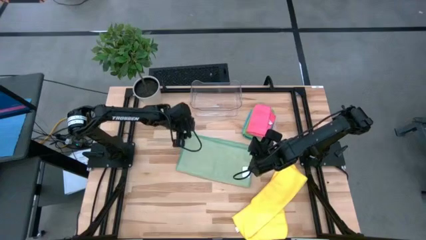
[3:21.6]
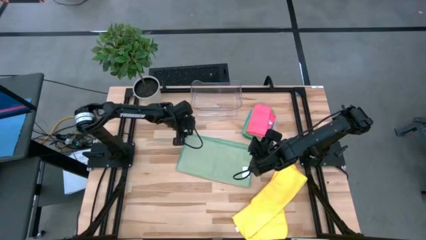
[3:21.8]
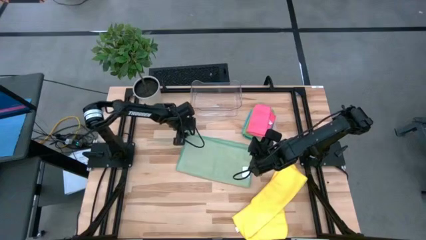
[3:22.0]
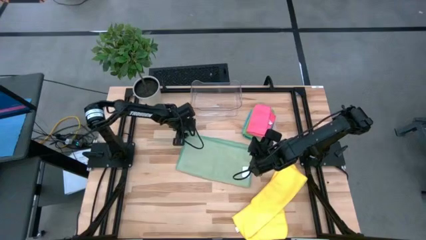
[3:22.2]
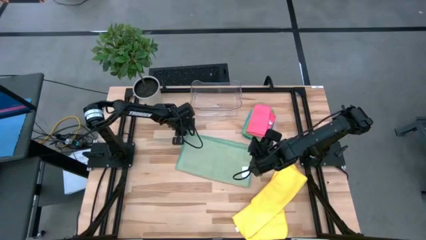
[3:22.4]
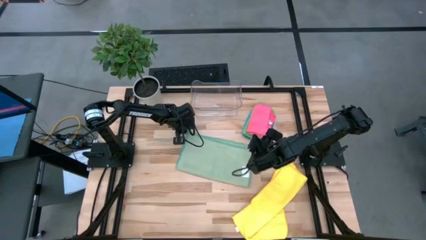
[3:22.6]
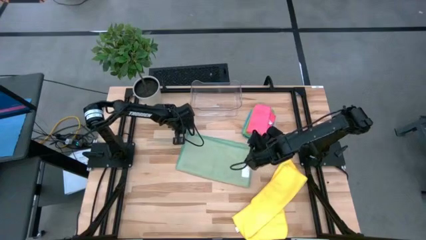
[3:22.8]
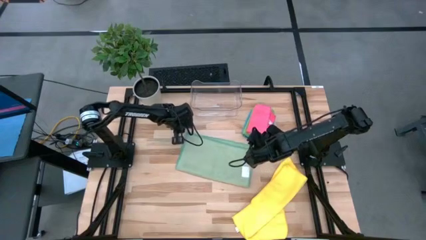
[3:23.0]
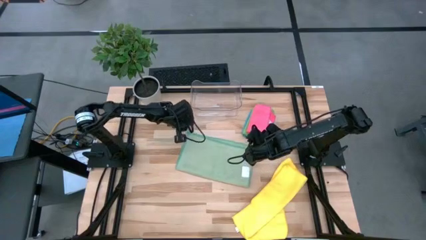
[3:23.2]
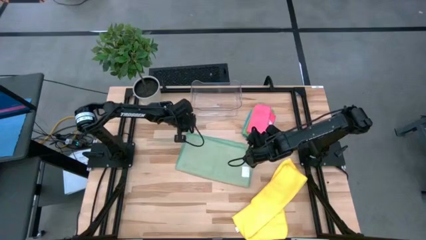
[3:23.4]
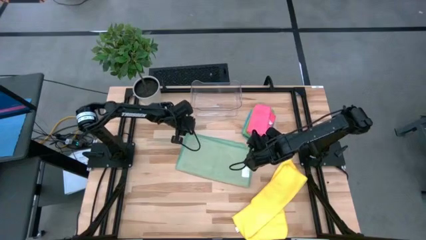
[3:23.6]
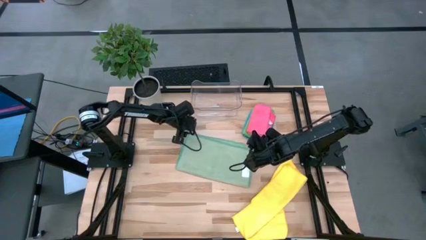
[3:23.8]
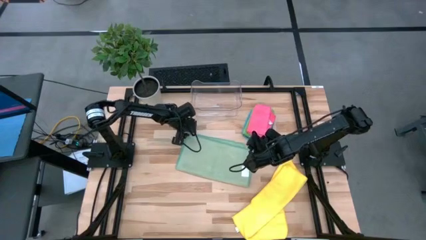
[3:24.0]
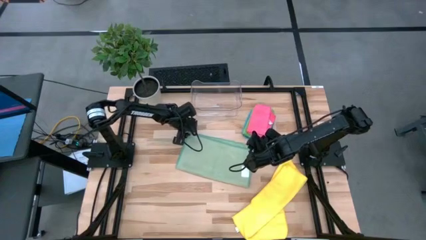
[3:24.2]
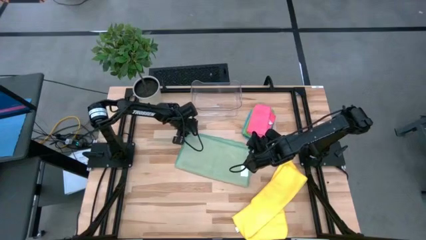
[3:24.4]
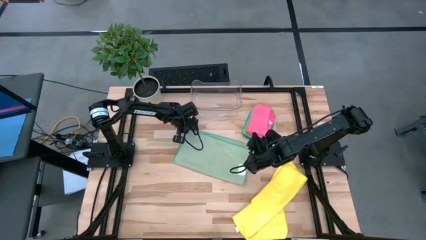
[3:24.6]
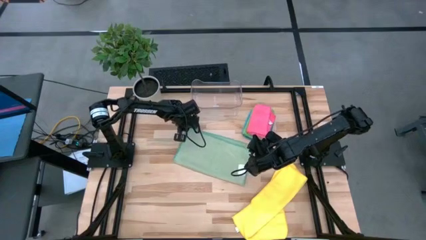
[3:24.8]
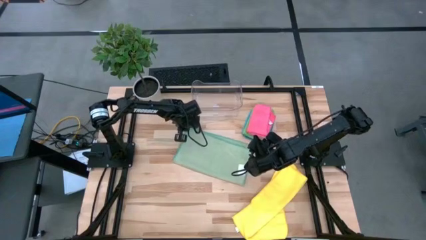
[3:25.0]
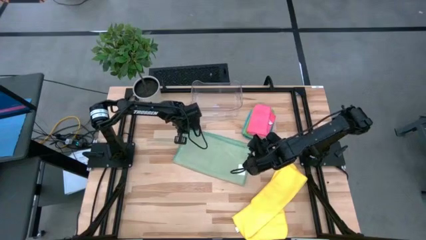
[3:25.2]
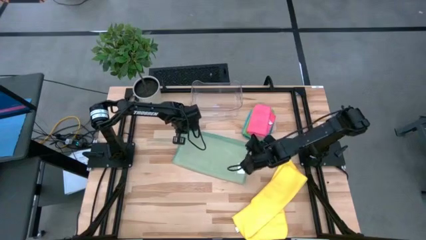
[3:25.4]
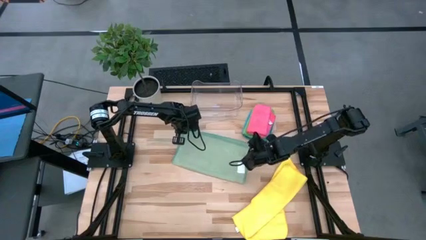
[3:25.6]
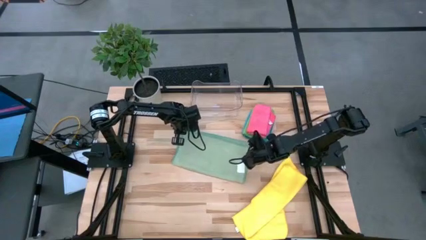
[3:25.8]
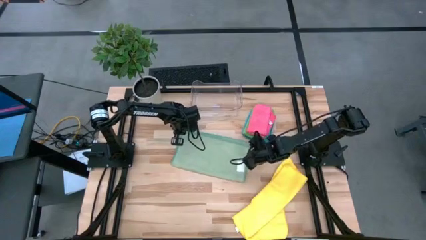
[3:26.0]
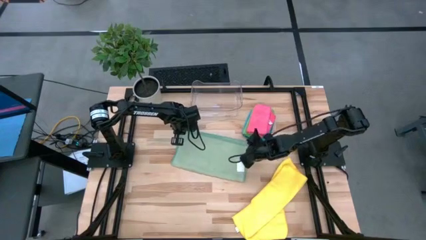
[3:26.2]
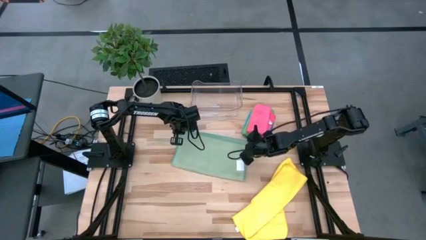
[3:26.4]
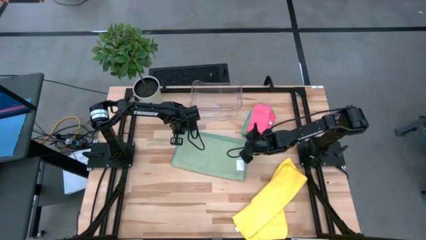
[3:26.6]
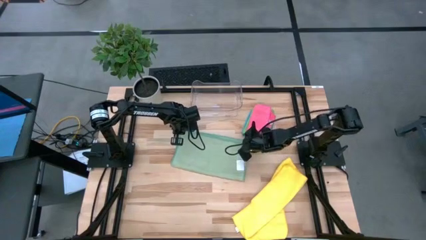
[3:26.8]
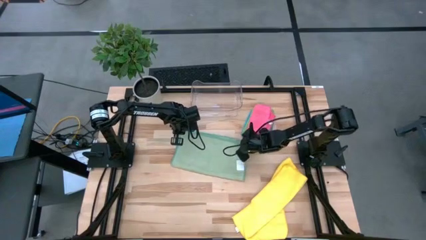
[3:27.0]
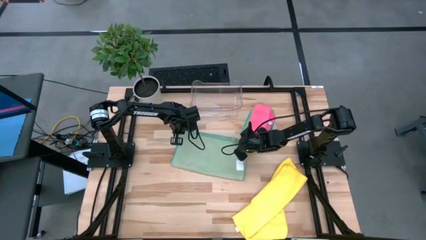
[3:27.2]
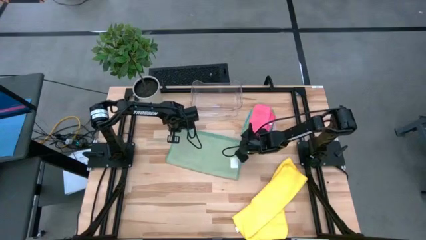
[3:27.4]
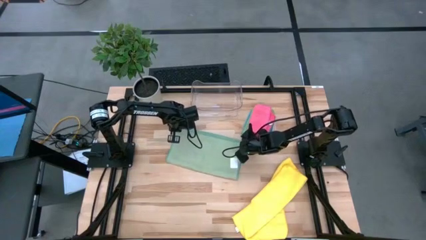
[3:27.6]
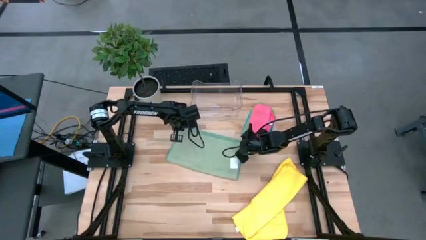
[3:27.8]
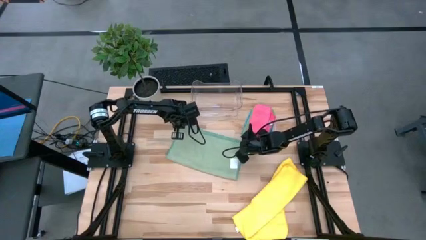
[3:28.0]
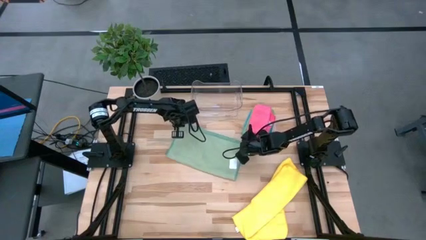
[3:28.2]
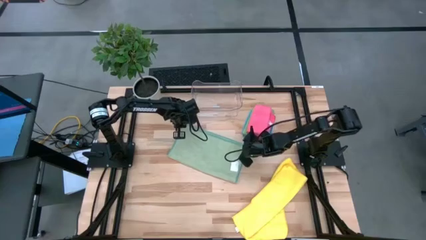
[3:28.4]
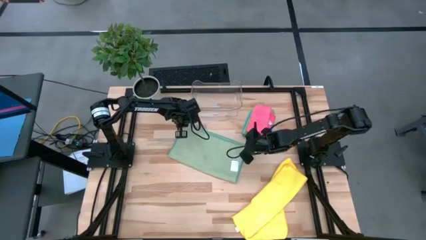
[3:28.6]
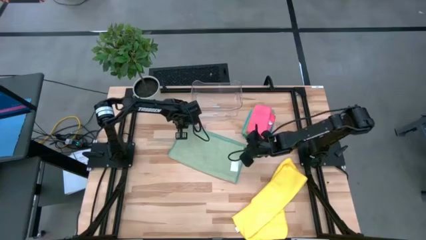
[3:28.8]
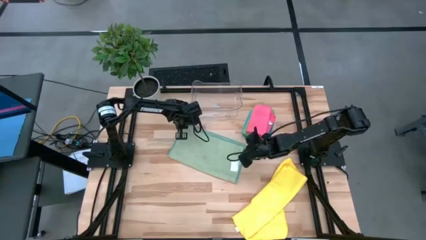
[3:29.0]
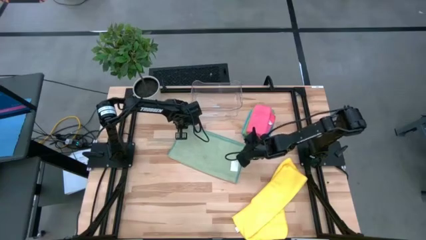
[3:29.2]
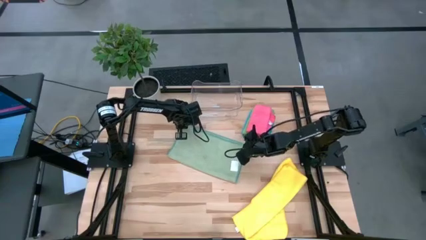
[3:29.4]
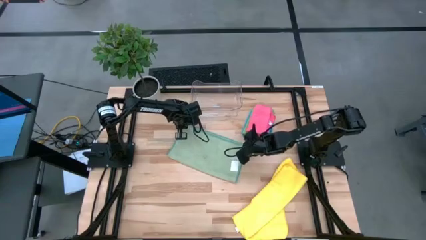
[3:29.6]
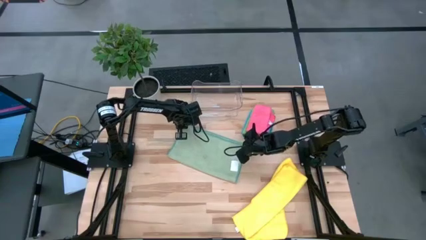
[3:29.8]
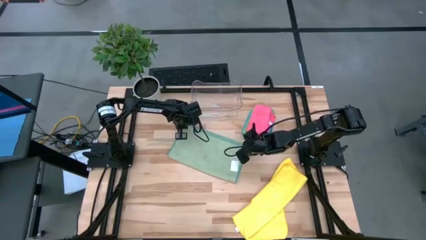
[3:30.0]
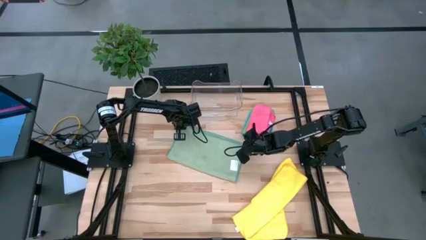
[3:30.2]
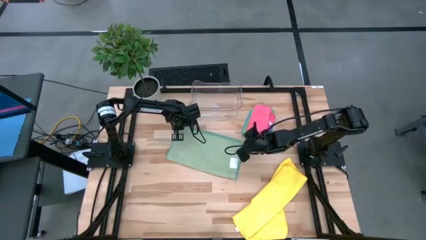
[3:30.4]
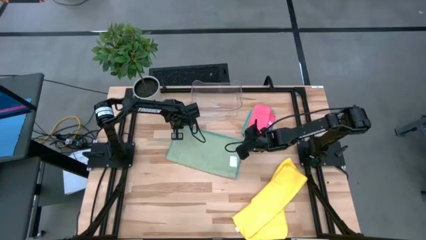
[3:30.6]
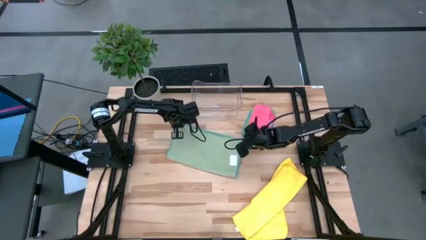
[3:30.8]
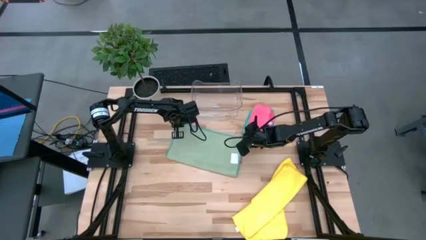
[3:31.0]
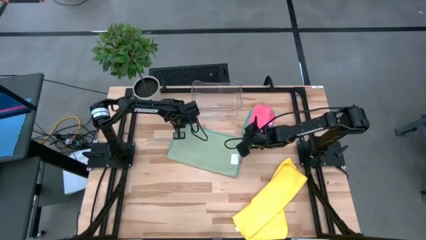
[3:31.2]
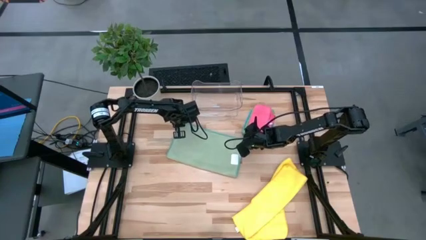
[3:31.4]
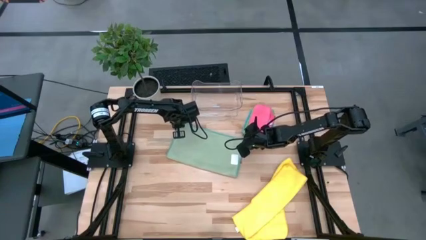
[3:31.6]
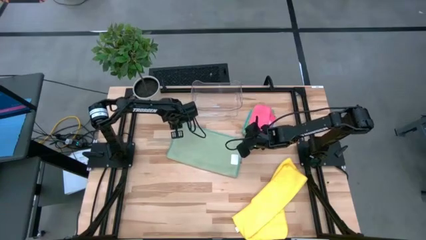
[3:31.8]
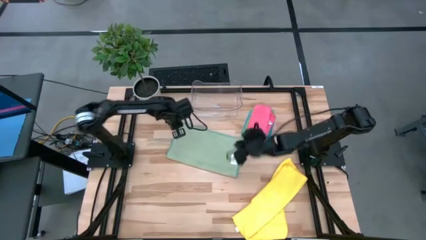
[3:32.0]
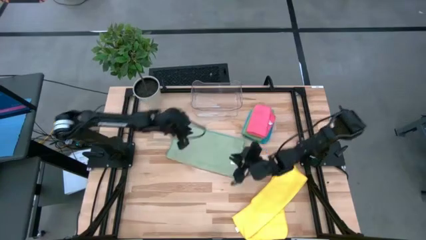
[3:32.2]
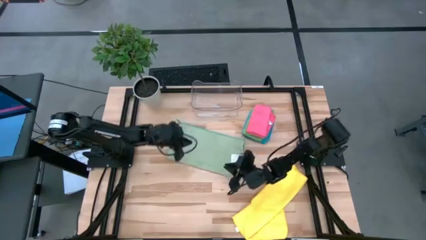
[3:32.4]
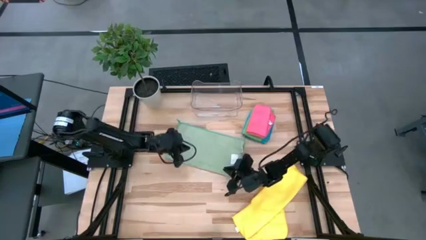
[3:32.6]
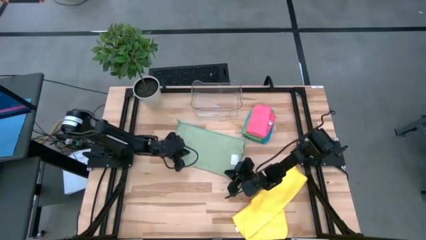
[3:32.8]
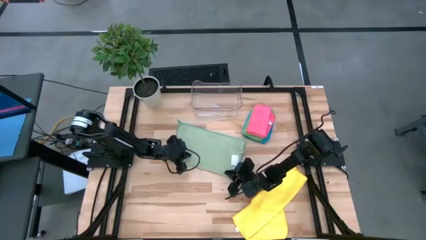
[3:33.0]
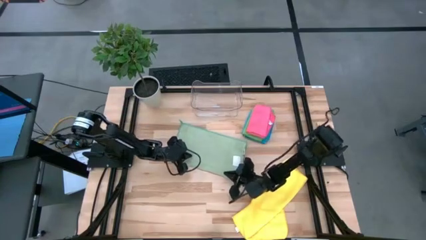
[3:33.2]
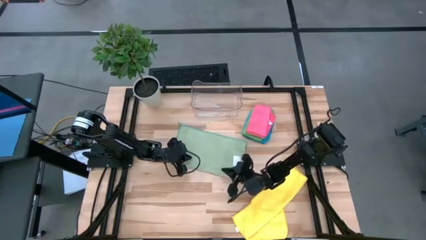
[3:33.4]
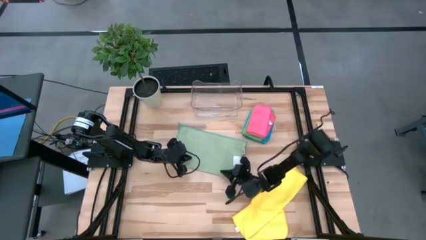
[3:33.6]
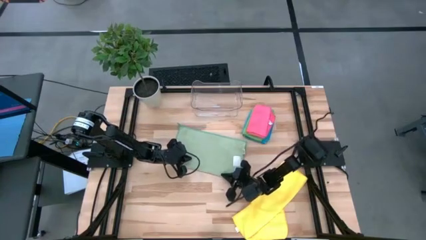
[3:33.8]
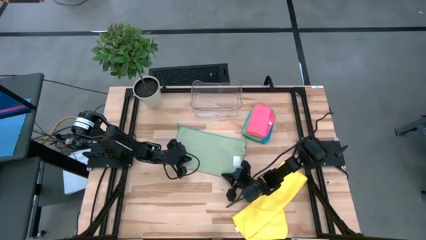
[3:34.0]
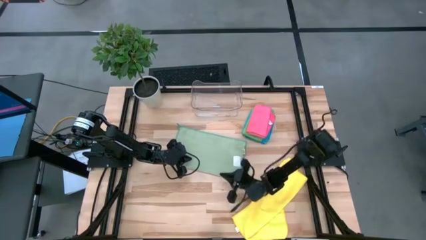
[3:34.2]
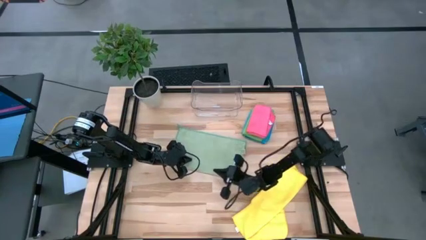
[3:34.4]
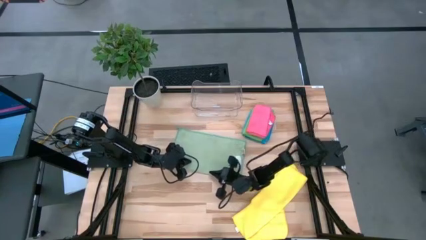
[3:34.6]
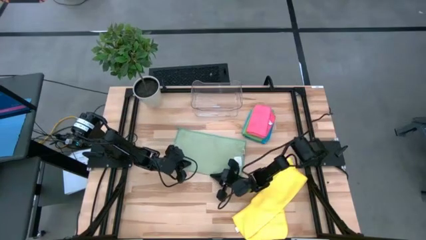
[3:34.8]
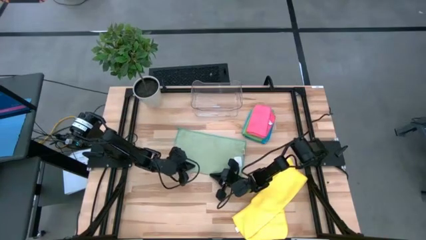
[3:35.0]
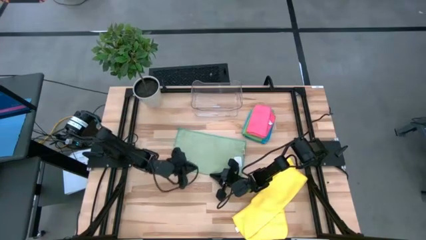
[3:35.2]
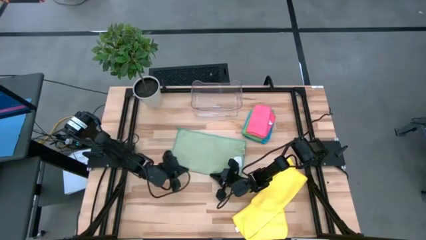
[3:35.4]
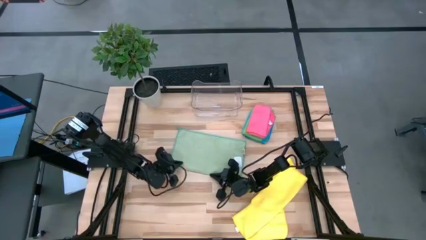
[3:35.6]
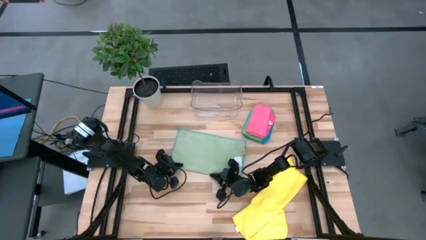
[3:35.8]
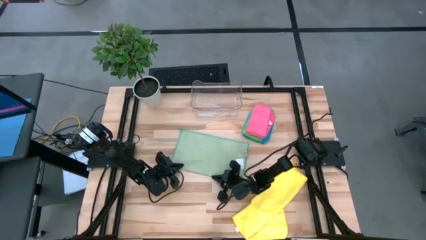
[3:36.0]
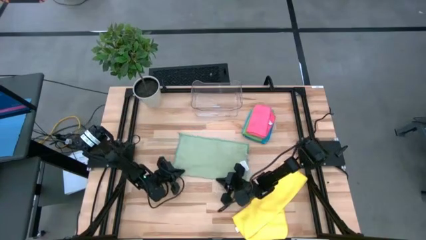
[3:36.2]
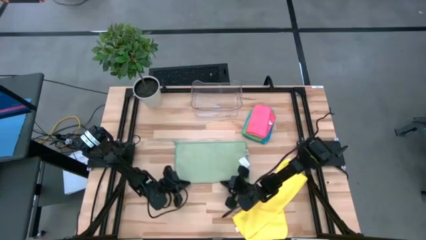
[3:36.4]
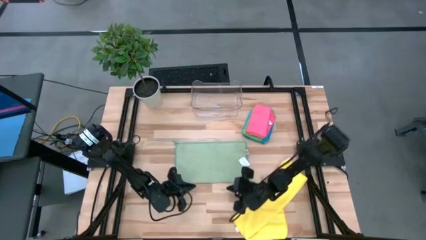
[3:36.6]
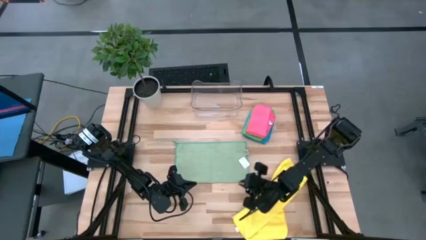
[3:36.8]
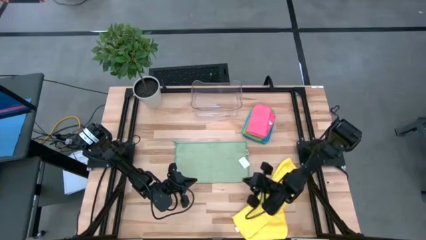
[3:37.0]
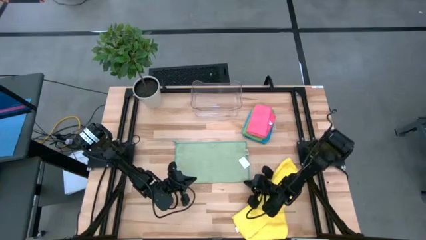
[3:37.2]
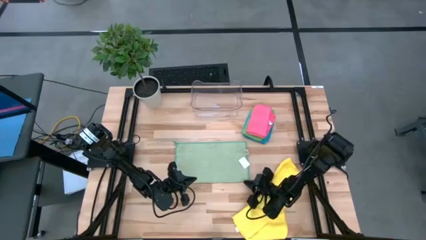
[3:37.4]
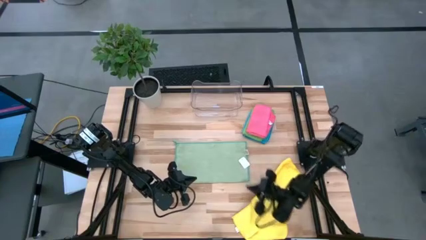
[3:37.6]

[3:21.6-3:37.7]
Task: Fold microfiber towels
Fold the light green microfiber towel
